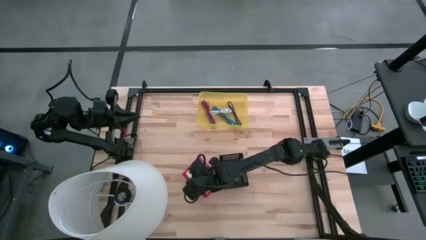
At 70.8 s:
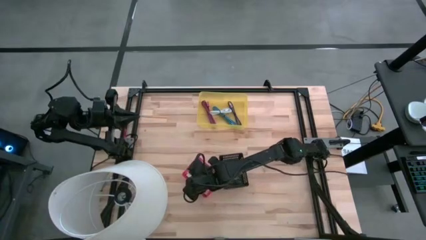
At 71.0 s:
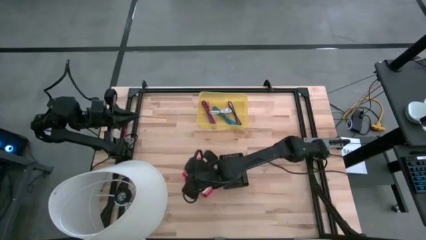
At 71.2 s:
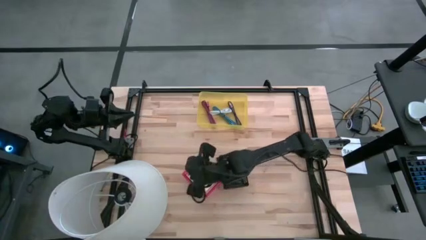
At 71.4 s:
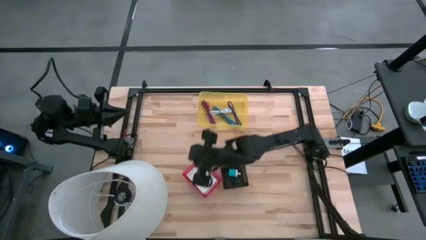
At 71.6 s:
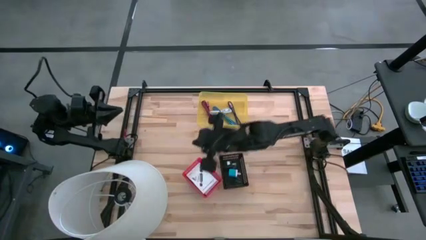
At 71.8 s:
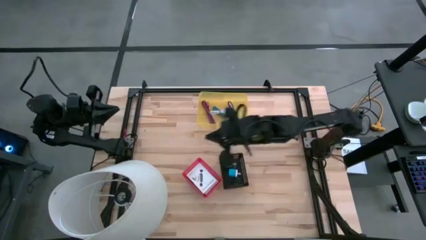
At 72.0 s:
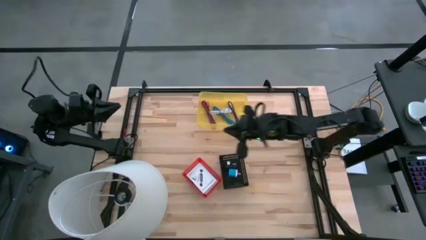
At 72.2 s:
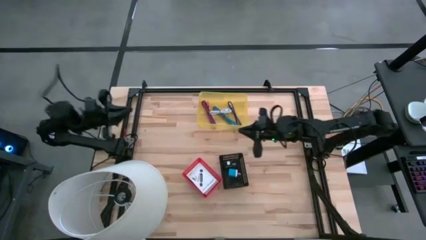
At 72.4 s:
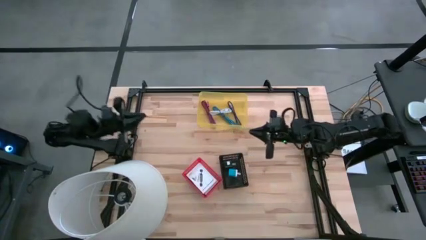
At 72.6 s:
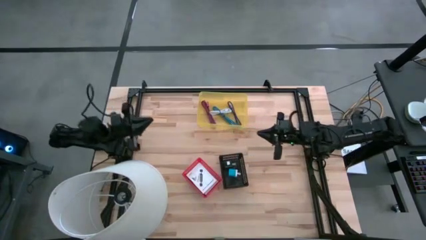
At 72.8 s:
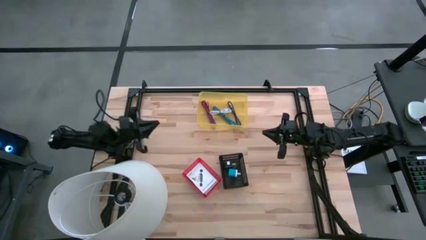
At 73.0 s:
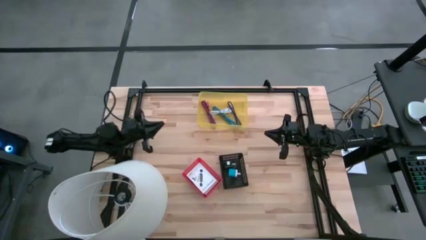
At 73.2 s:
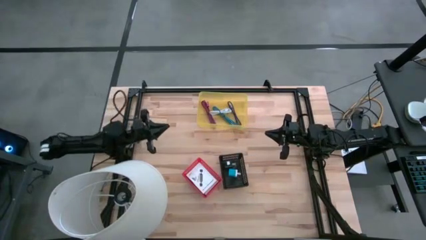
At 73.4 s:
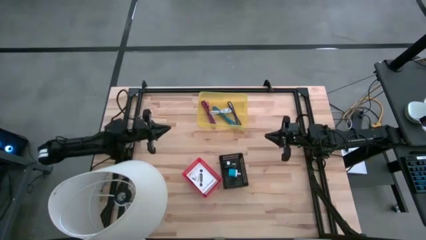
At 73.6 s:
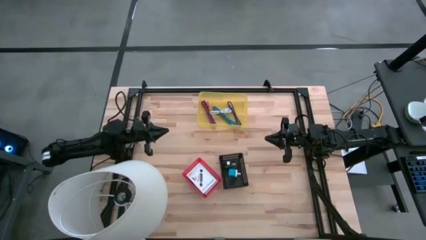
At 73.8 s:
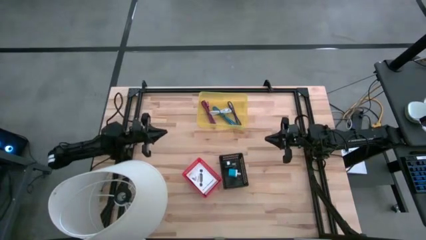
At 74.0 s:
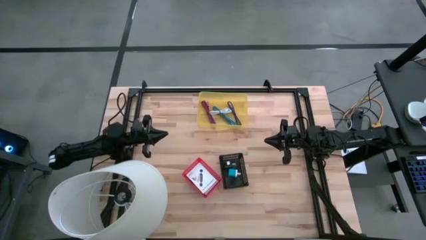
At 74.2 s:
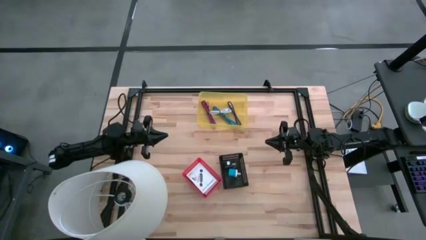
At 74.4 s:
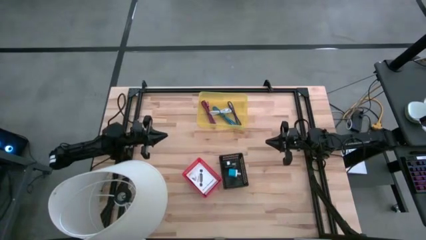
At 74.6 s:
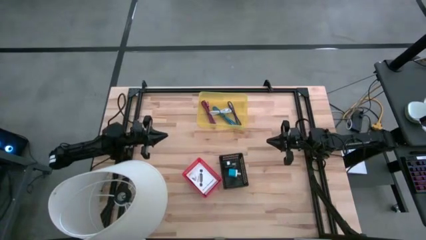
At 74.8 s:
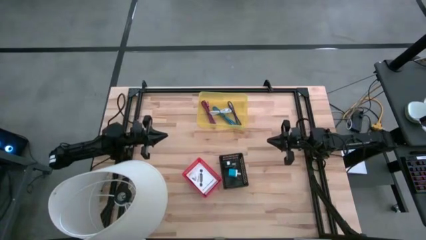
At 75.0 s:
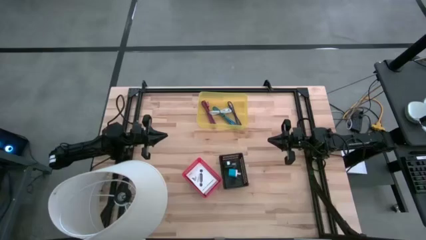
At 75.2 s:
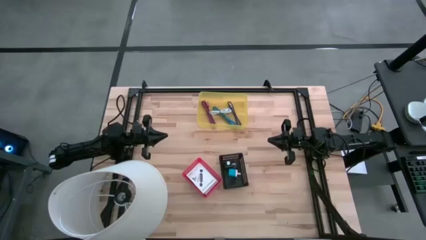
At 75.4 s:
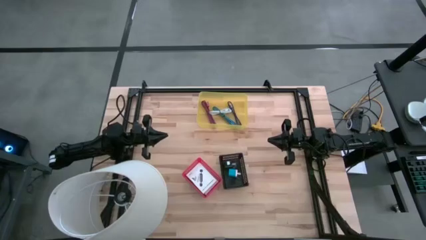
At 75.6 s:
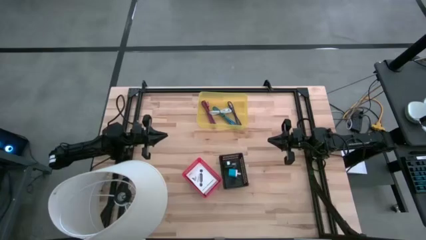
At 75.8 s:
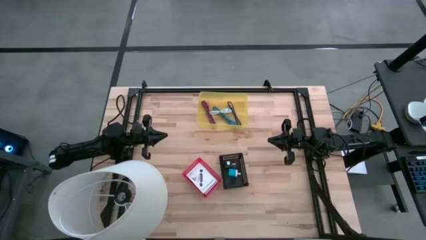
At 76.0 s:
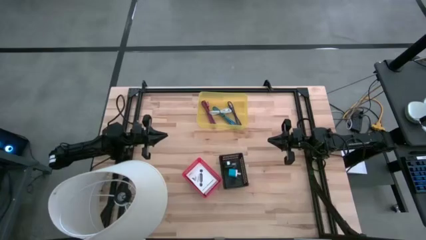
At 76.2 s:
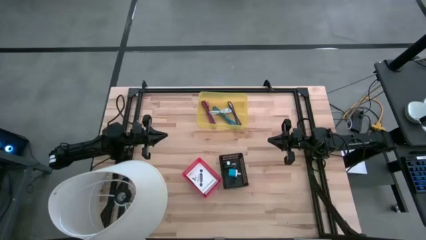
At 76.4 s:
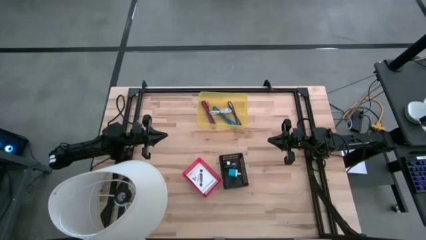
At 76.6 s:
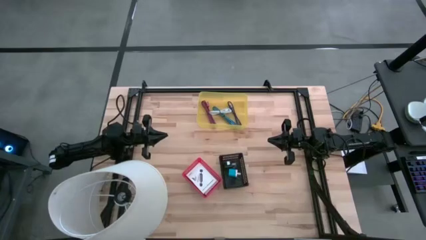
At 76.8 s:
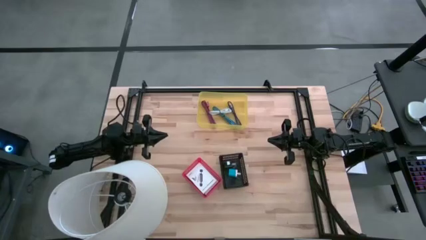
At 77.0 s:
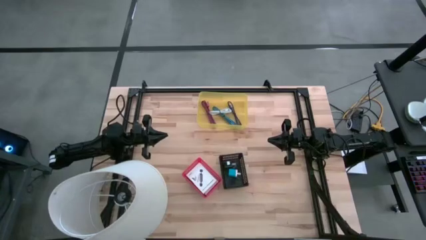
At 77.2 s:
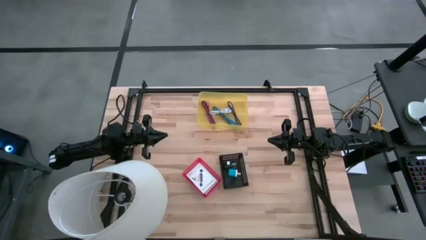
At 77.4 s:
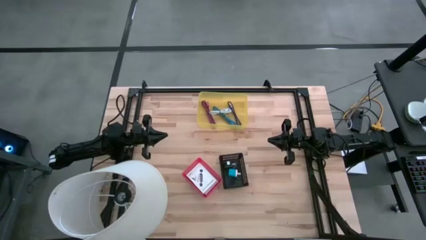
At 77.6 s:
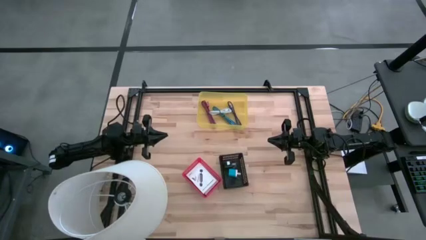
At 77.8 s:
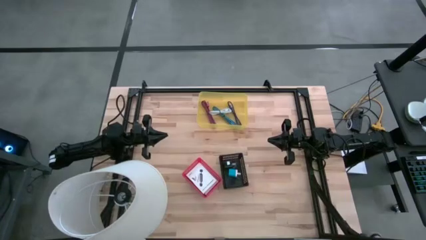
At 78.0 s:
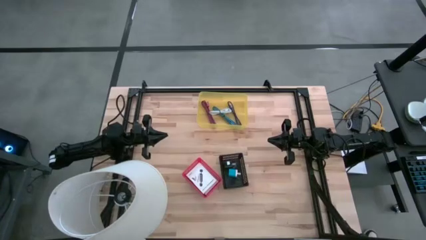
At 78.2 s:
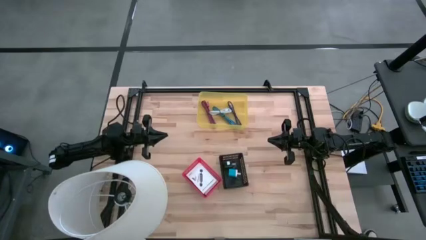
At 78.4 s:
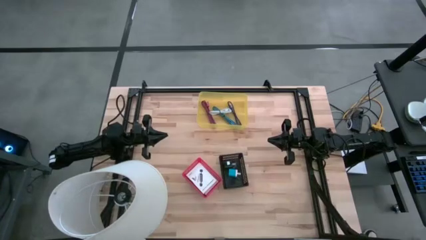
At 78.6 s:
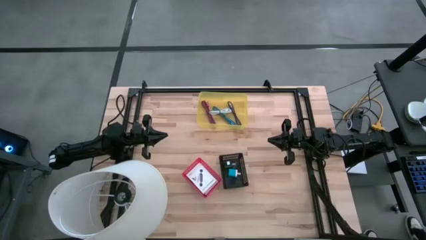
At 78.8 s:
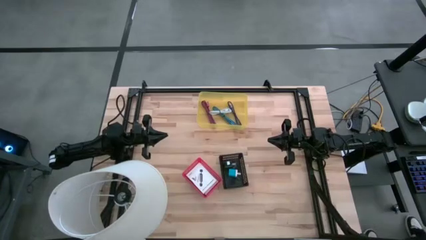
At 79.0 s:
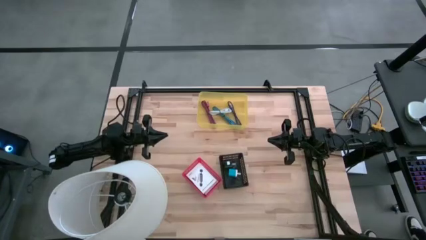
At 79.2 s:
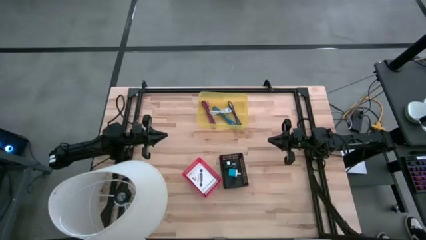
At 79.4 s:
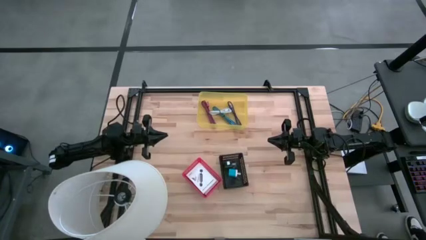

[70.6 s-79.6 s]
Task: Pick and place items into bin
Return to Home Position

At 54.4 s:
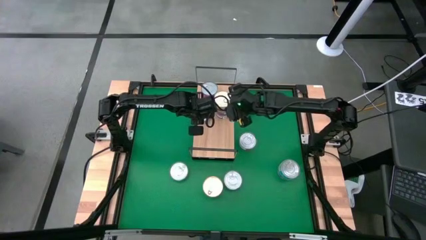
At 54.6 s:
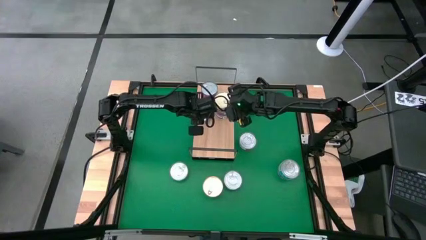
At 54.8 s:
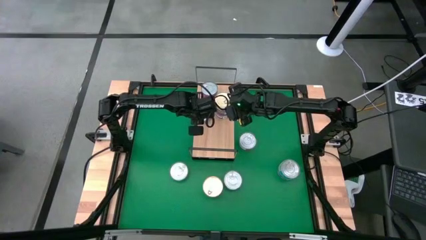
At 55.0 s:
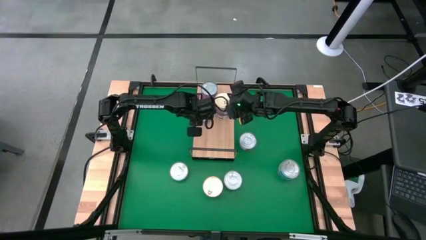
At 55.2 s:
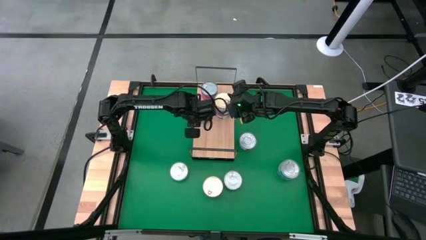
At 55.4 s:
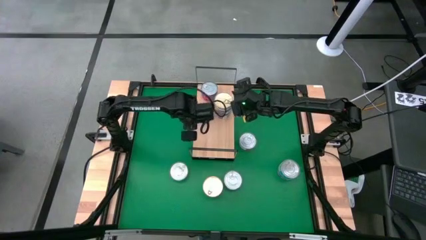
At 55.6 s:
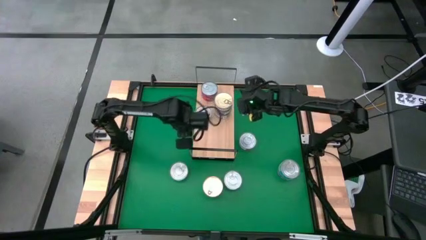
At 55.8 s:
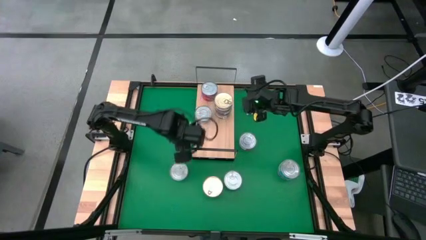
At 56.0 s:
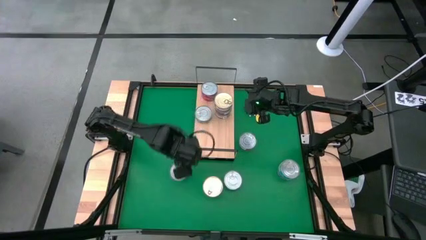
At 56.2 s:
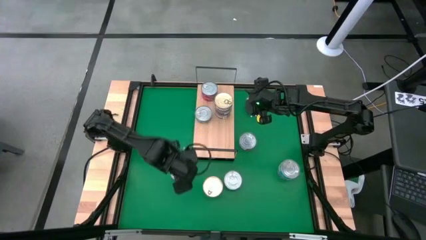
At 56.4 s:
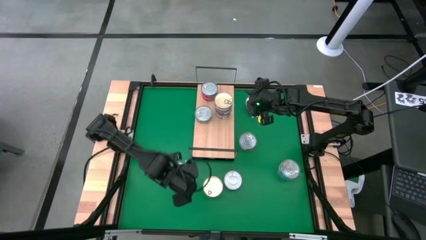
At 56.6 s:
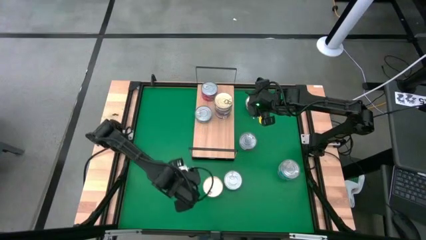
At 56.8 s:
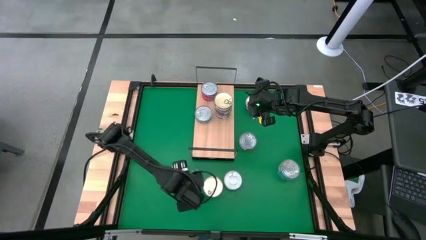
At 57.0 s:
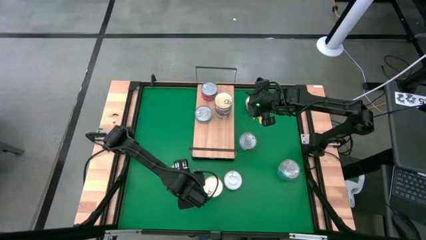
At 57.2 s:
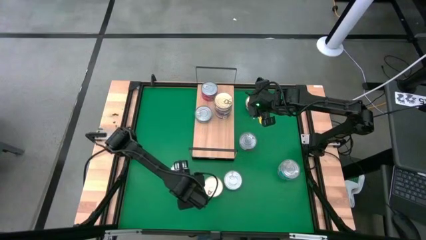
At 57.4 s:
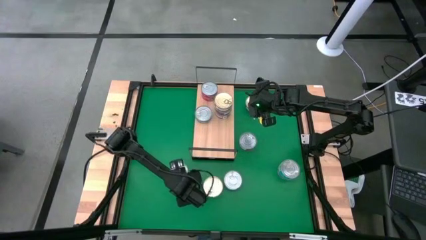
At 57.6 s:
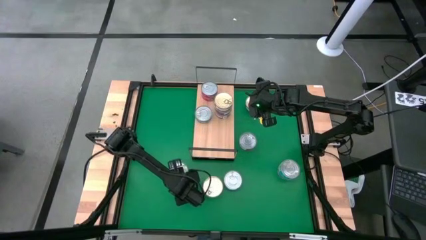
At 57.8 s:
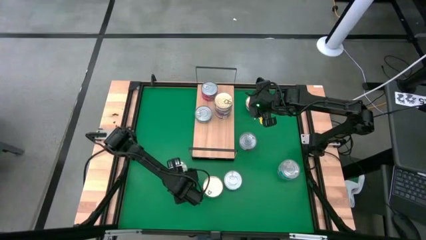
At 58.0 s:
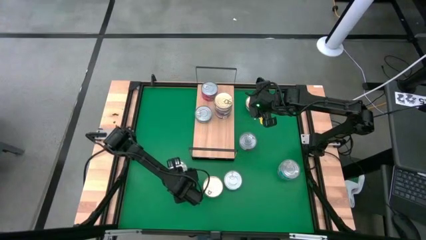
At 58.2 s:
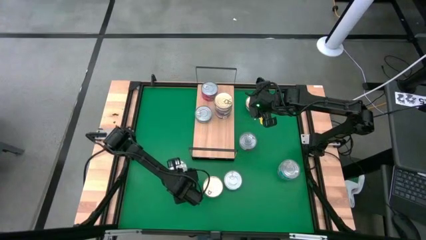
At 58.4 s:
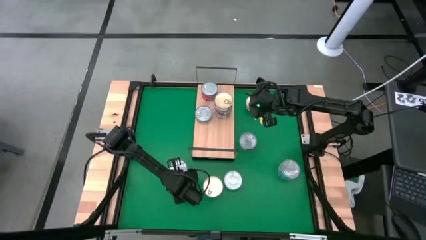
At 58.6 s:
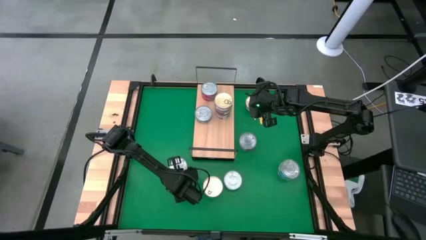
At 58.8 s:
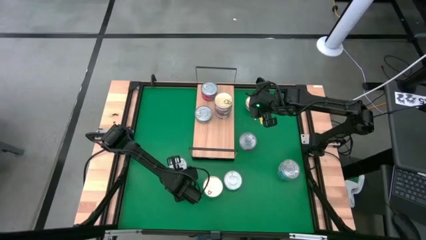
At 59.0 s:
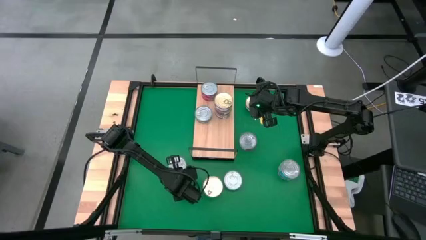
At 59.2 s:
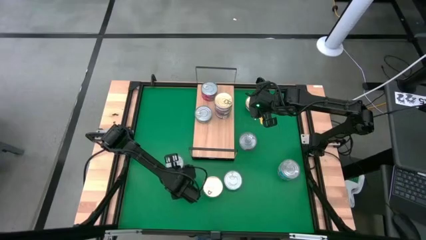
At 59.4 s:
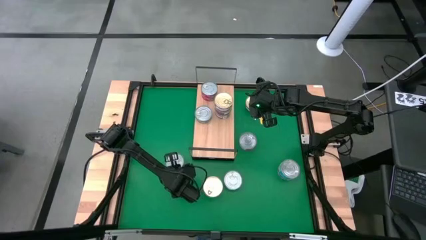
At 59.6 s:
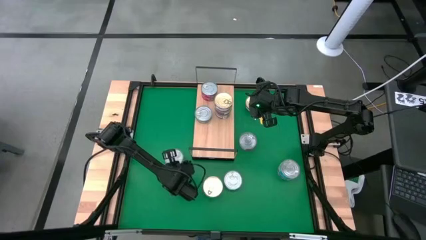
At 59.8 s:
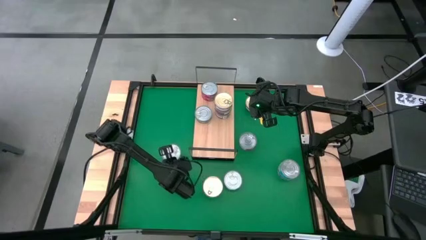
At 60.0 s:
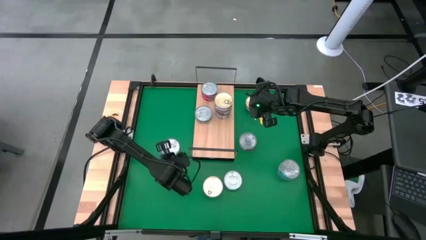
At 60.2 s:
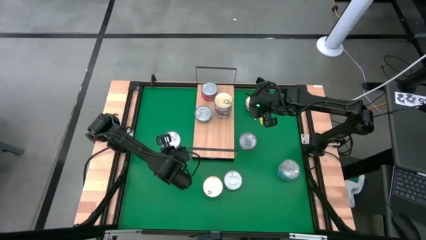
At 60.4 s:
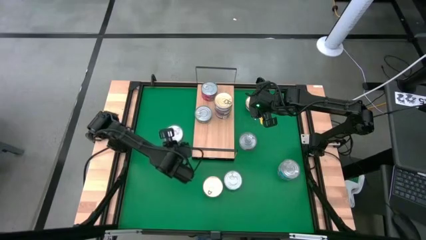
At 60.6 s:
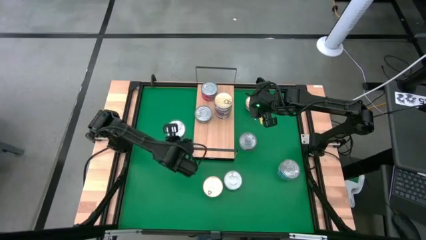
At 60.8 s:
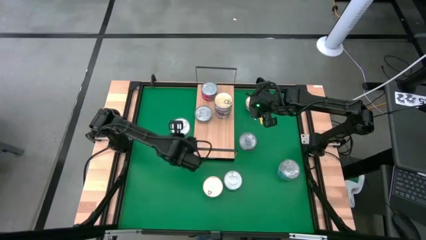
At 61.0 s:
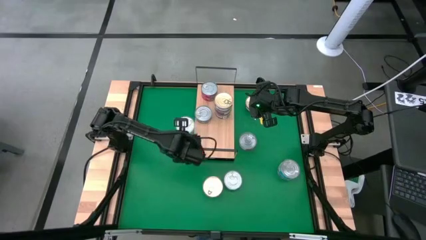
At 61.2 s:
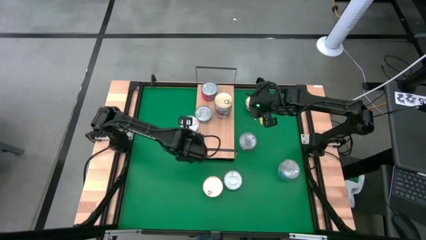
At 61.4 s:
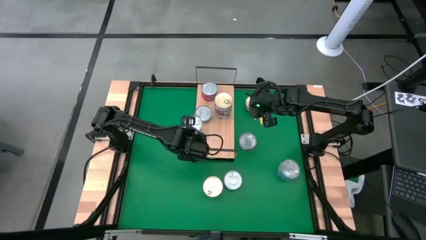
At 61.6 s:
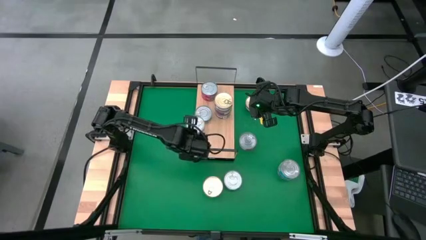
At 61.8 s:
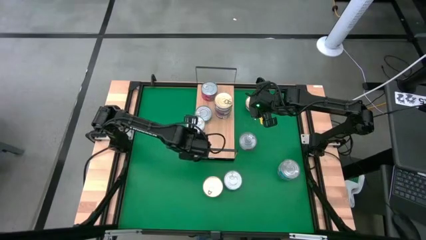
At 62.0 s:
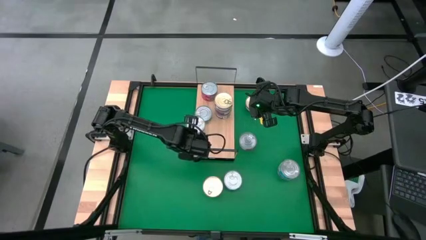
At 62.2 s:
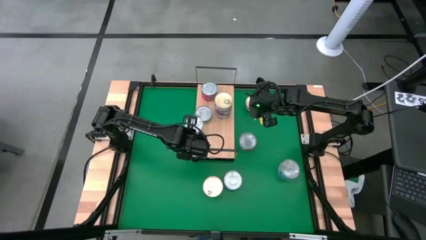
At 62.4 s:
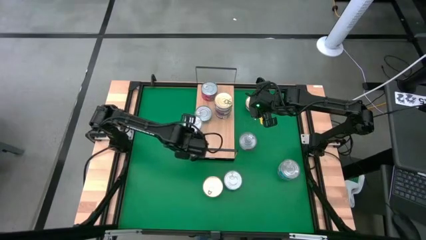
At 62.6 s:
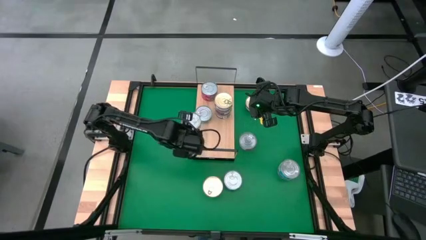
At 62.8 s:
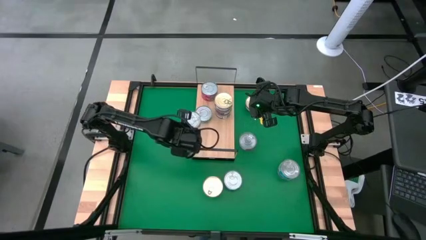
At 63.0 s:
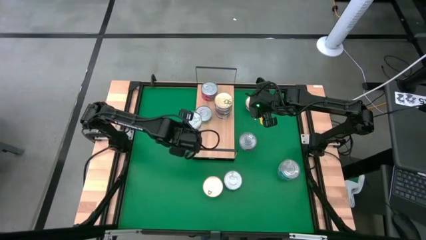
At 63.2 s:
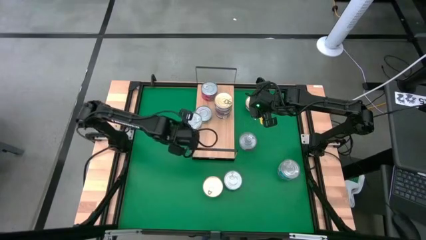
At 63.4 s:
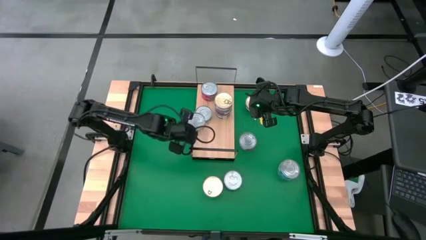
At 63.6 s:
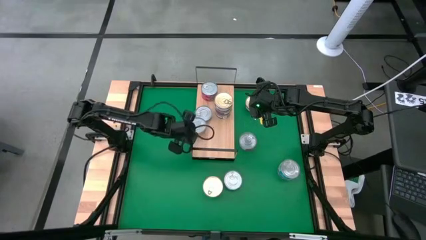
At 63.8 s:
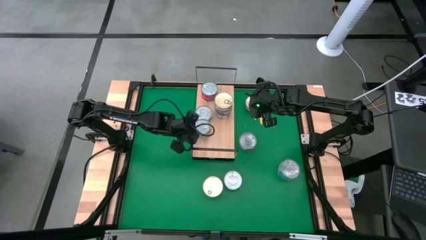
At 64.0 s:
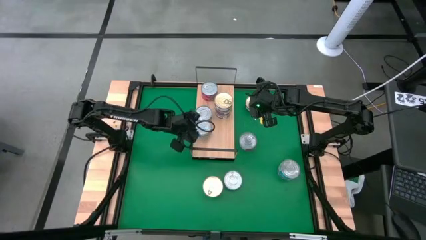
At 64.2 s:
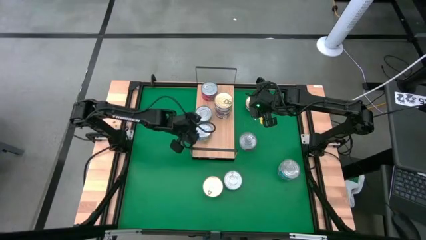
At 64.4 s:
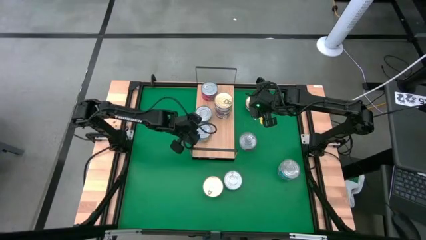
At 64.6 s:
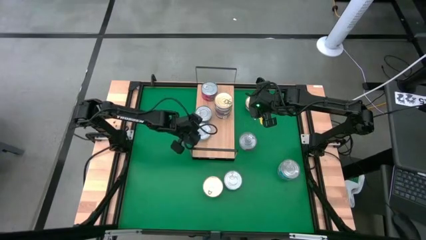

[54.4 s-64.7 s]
Task: Stack canned seafood by type on shelf
Put the light blue tuna can on the shelf
